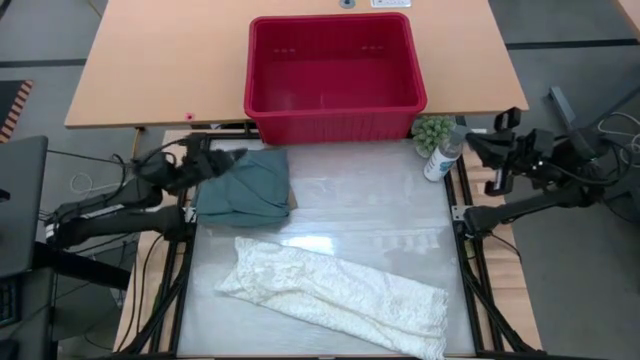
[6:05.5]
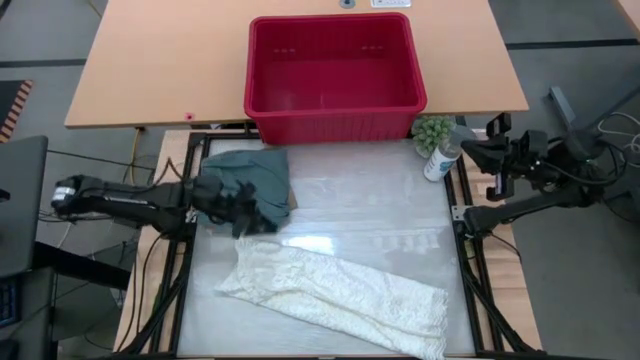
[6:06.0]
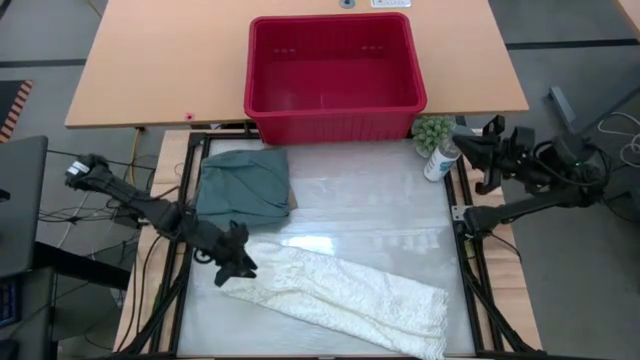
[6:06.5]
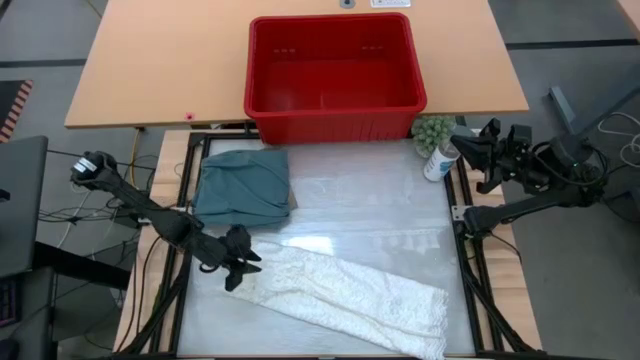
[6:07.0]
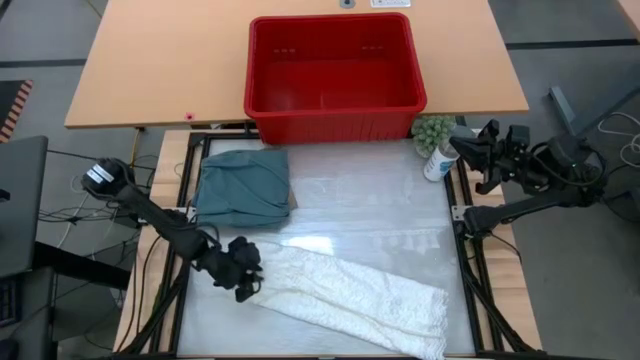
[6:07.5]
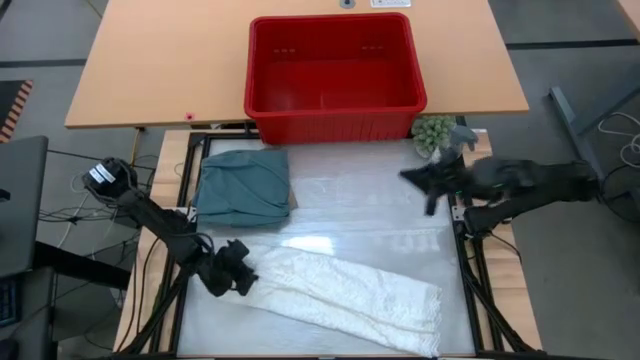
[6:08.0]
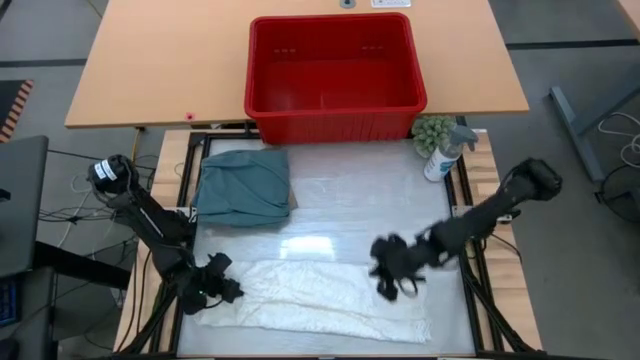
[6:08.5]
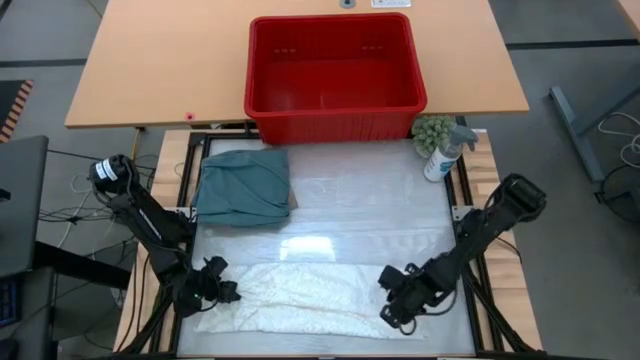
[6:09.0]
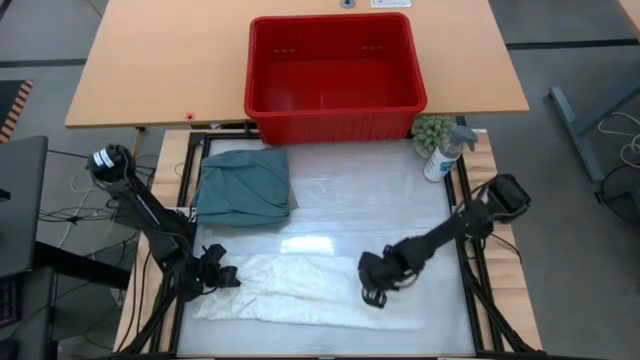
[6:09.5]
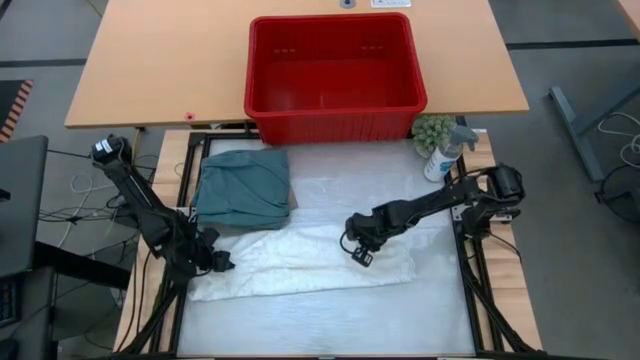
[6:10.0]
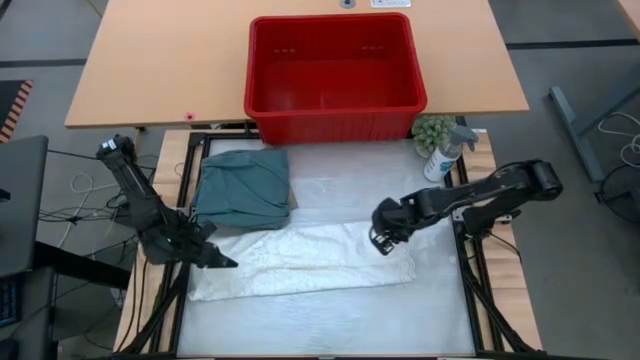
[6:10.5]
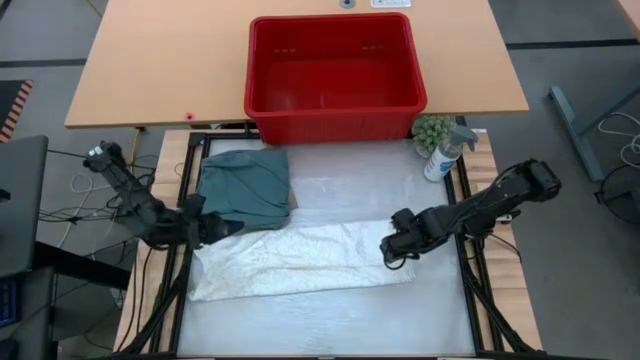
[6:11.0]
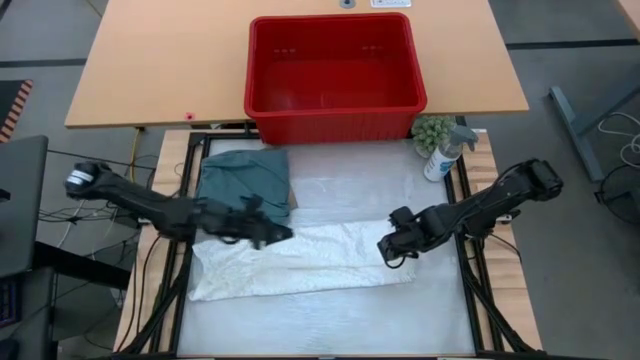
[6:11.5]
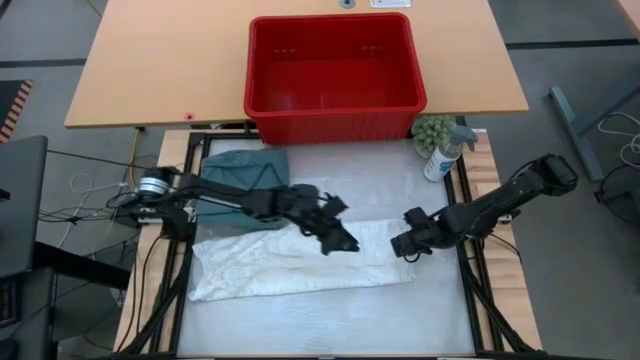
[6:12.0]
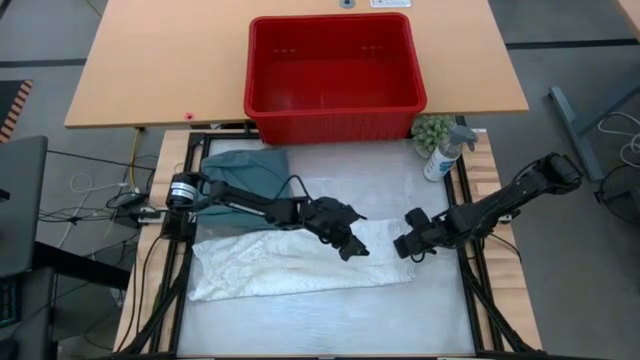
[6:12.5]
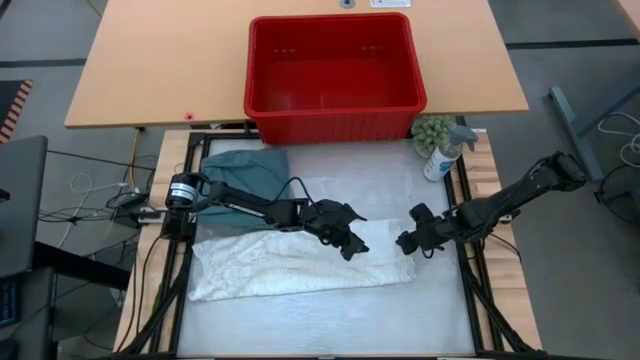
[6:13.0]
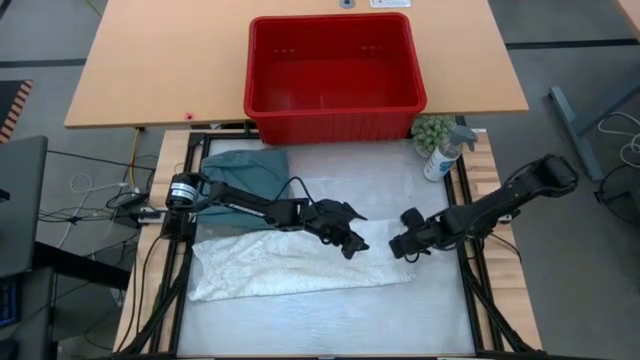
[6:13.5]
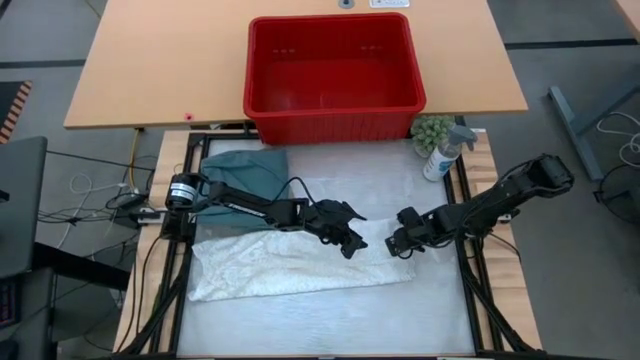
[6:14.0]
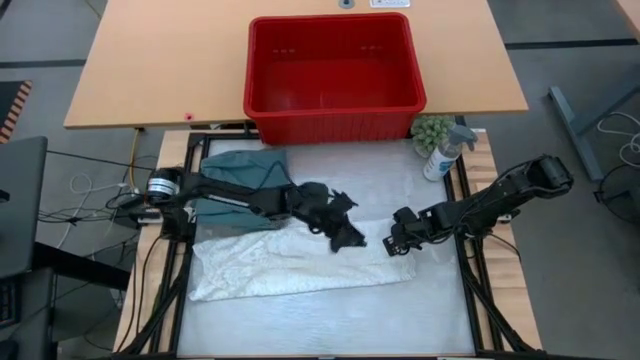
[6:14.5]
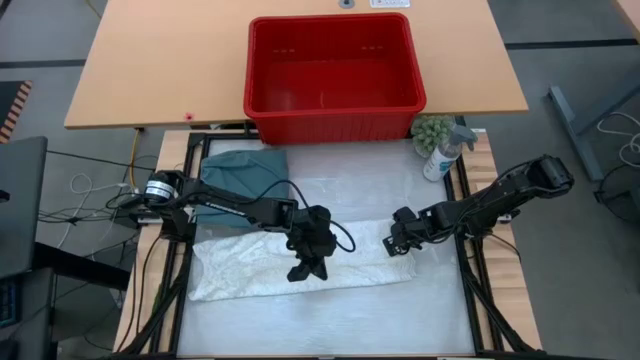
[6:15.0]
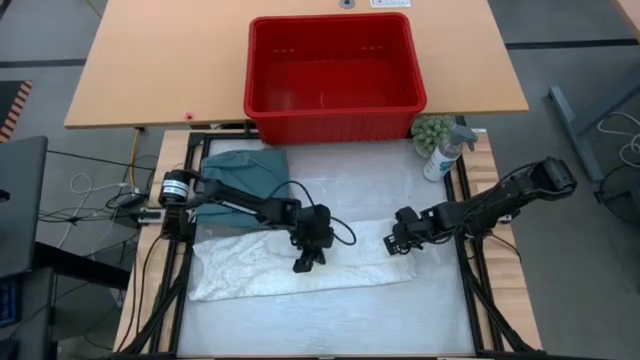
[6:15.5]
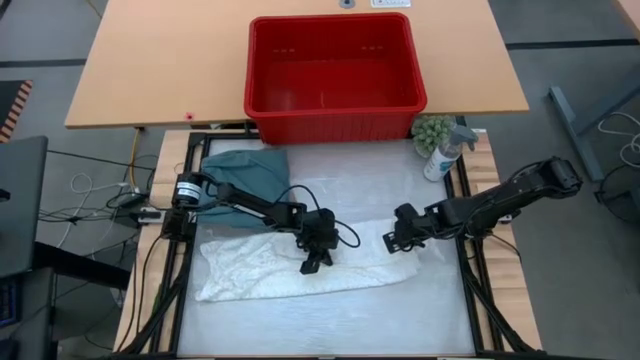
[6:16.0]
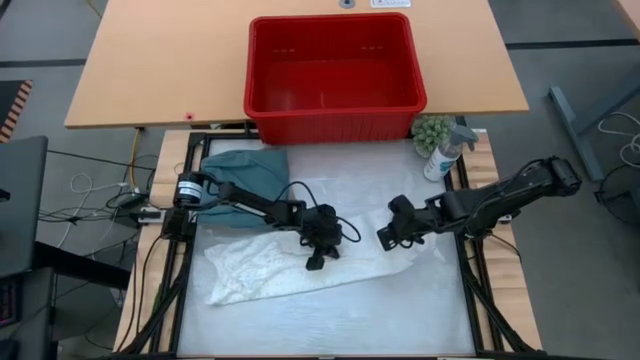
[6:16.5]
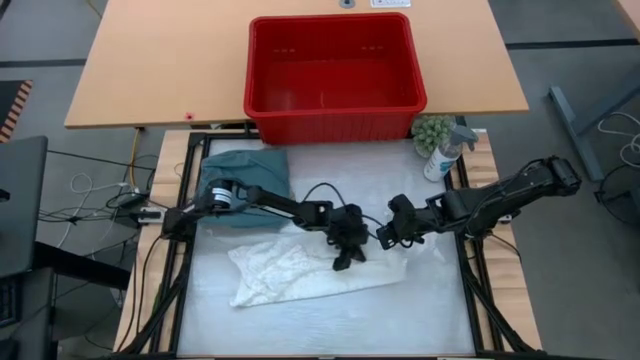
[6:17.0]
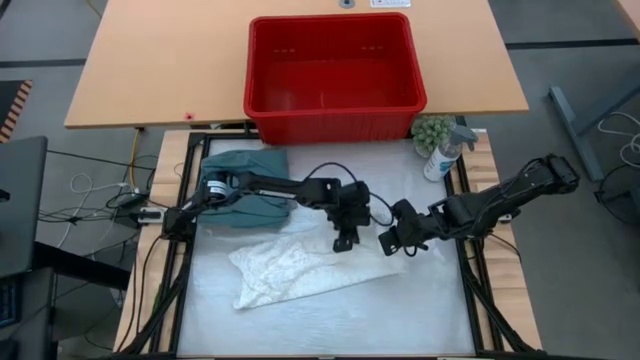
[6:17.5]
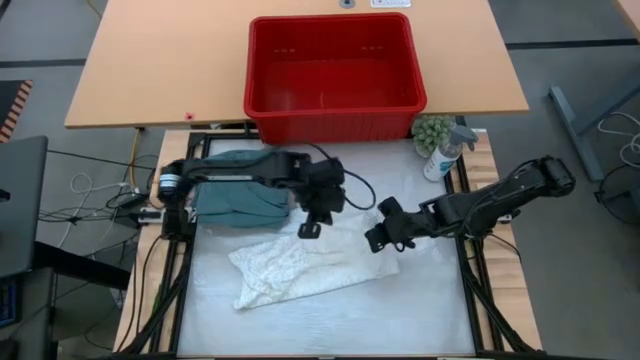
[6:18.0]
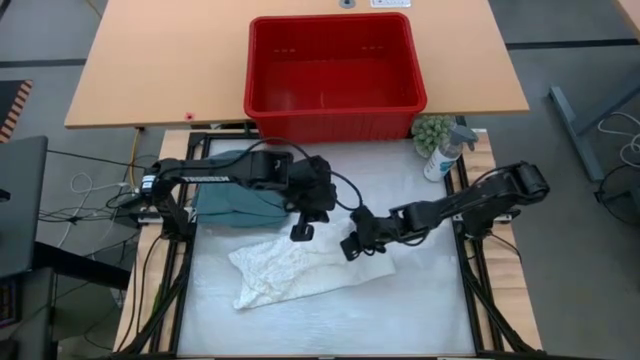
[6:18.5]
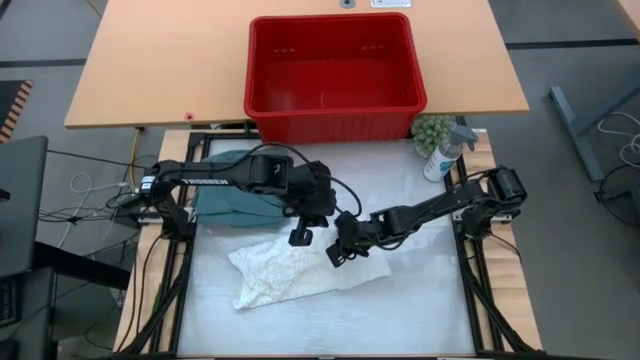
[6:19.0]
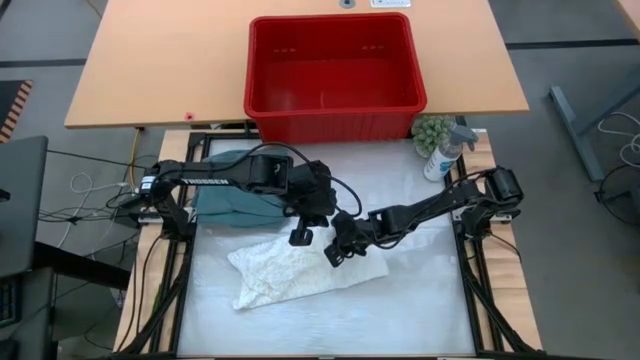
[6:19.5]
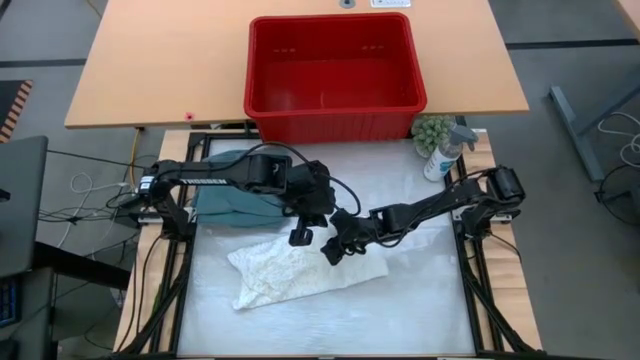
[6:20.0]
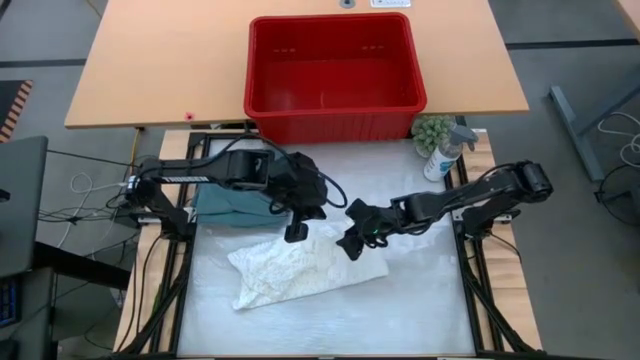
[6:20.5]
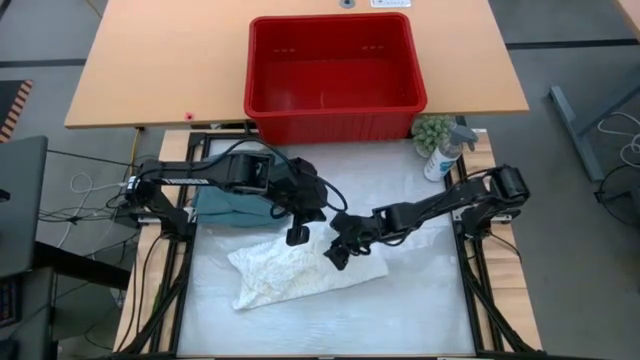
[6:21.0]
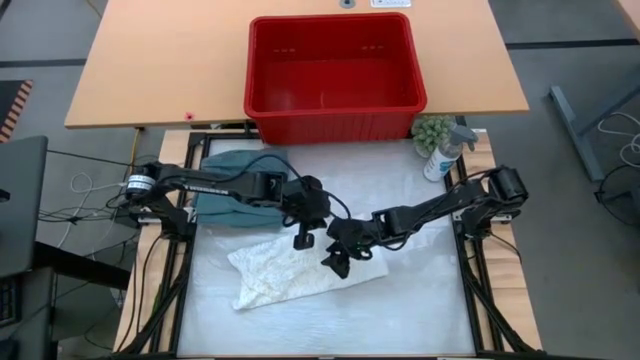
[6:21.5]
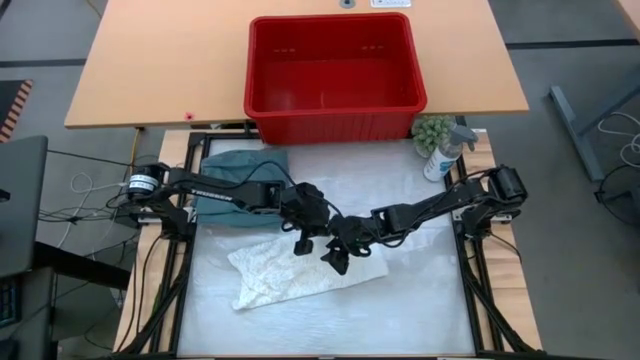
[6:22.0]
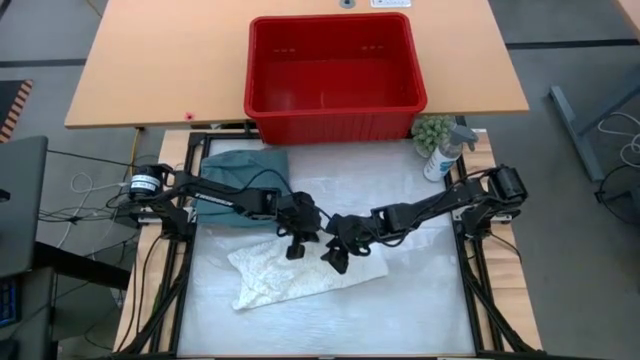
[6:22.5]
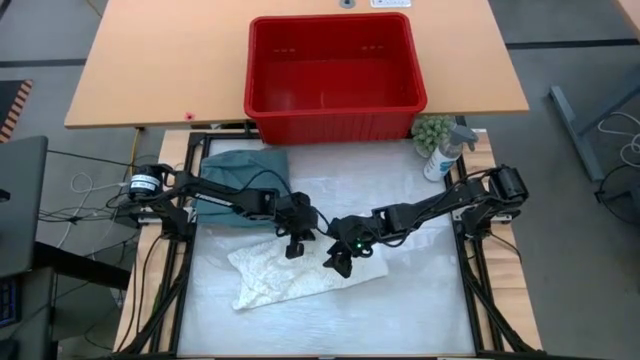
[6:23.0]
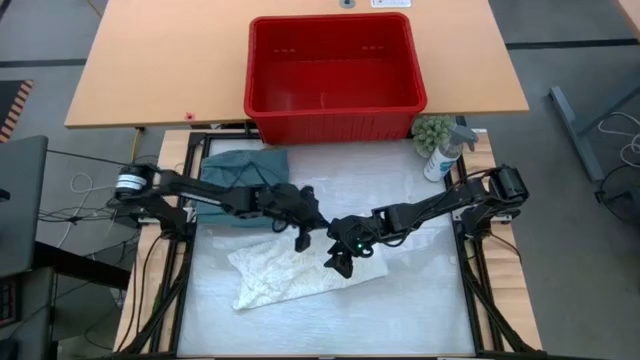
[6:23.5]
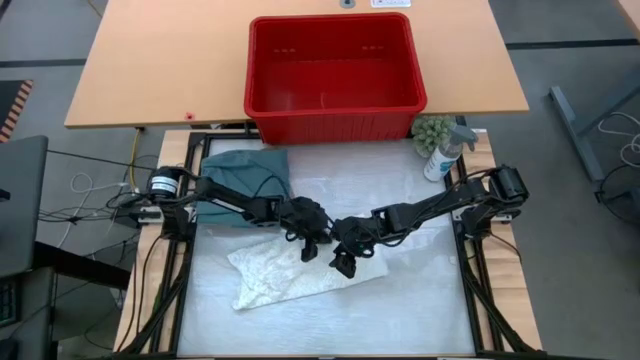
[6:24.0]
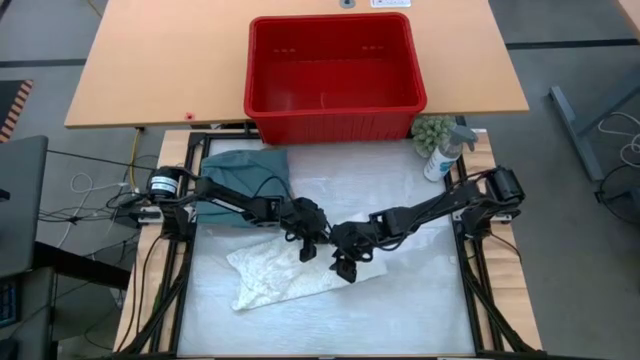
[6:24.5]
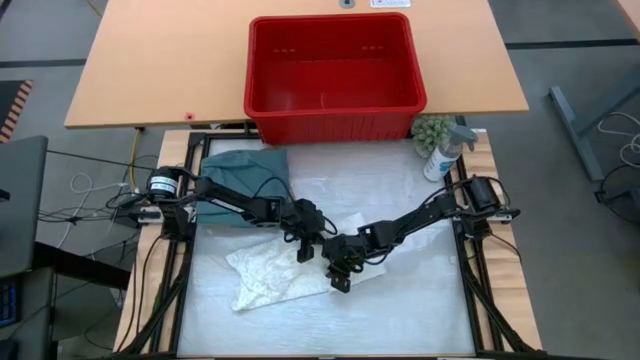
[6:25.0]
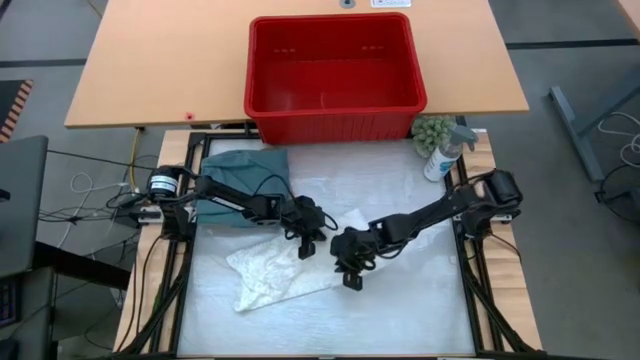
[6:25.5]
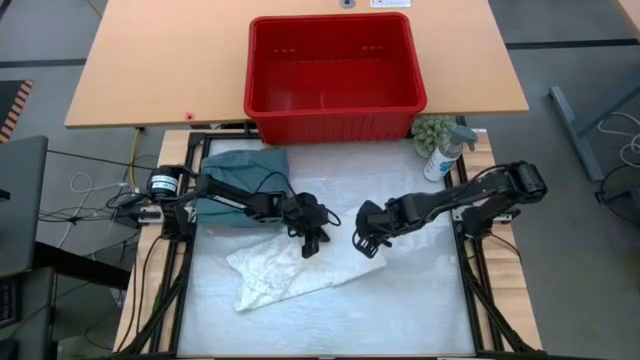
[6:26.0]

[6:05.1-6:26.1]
Task: Fold Laundry from Bin
Fold the white shirt in the red bin
